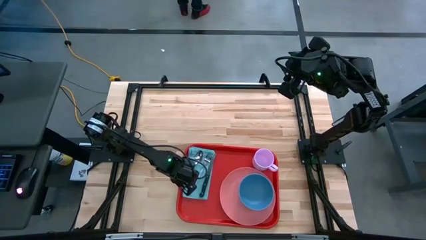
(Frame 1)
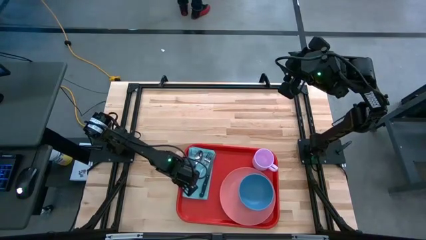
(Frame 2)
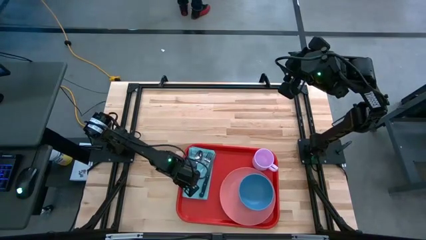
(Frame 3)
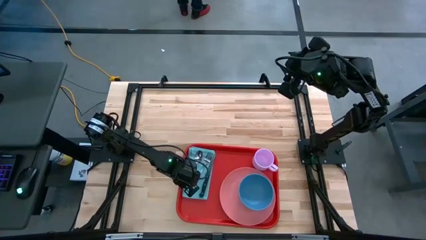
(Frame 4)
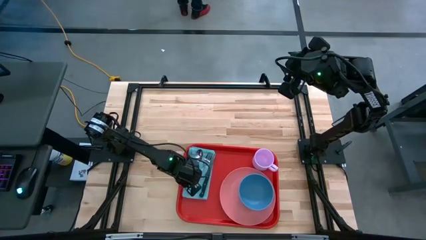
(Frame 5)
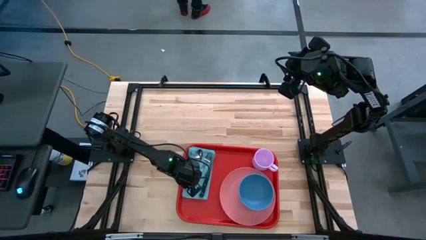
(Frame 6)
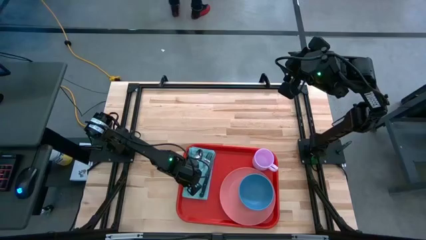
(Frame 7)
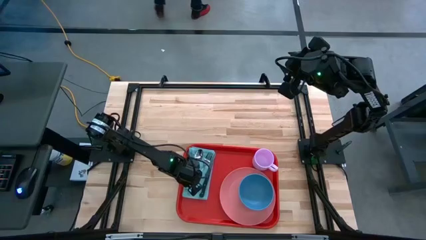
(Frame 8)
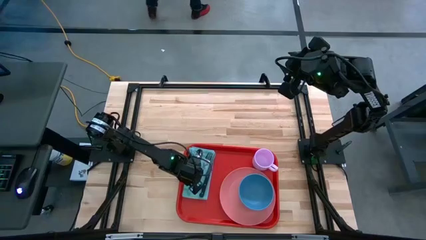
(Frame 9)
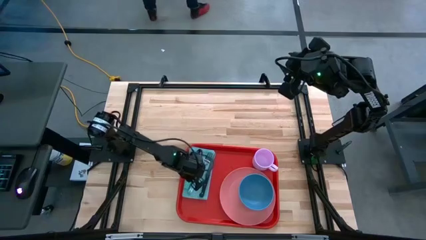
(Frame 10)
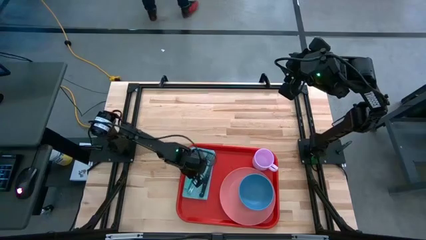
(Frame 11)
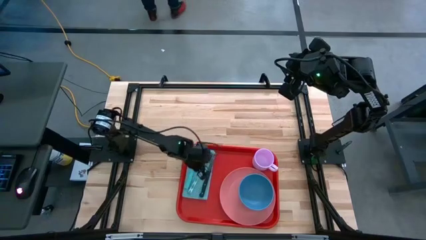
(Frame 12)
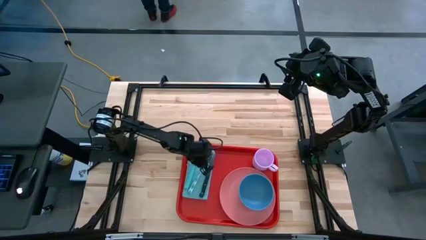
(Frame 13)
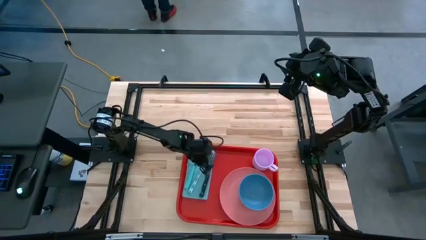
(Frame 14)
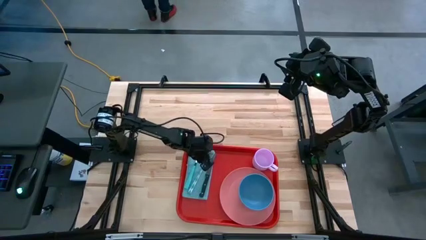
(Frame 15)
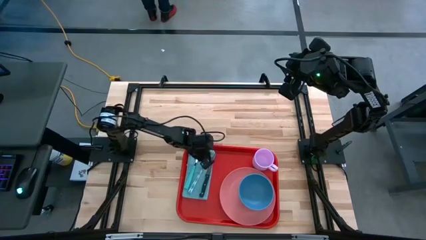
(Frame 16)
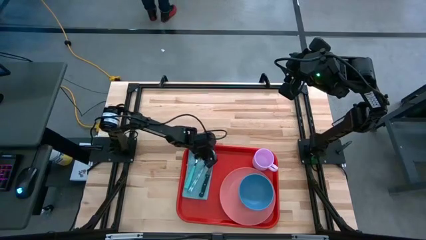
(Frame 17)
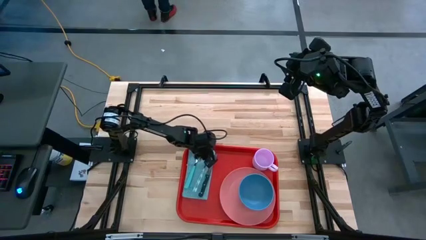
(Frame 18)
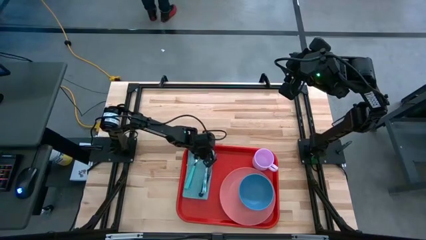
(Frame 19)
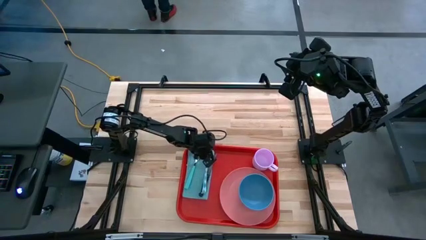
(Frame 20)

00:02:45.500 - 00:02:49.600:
Task: Set up tray
Adjust the silverwares

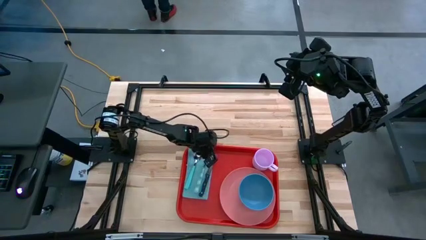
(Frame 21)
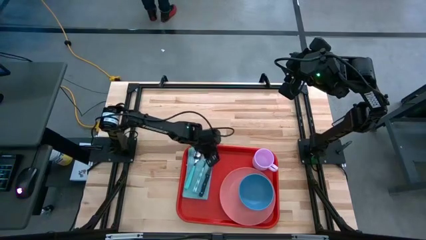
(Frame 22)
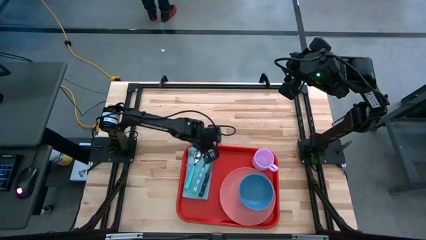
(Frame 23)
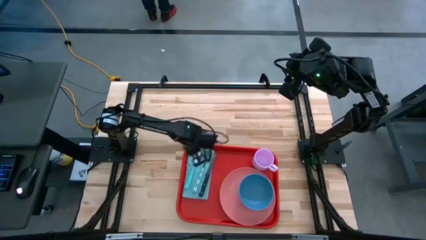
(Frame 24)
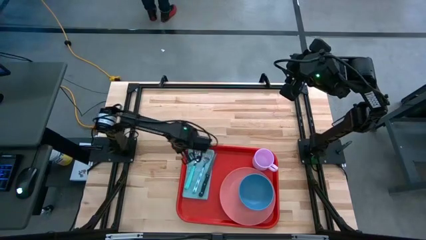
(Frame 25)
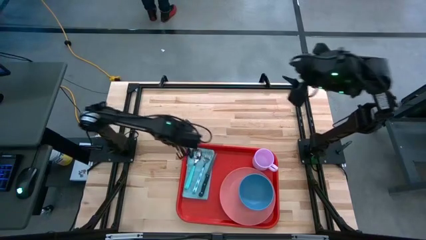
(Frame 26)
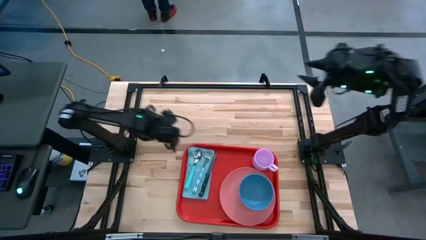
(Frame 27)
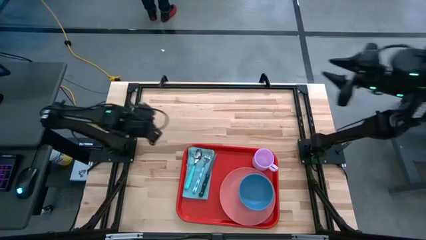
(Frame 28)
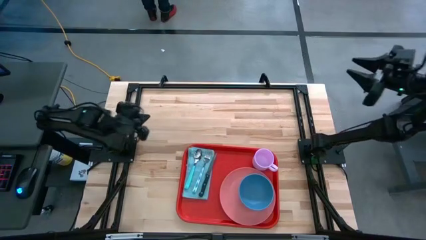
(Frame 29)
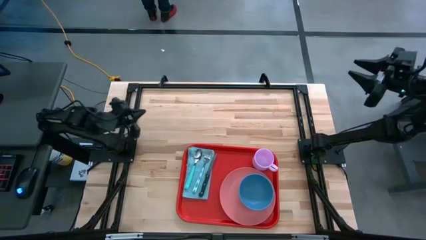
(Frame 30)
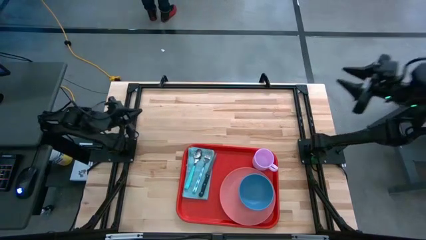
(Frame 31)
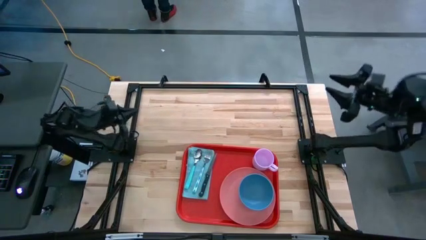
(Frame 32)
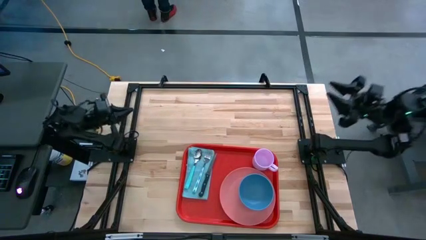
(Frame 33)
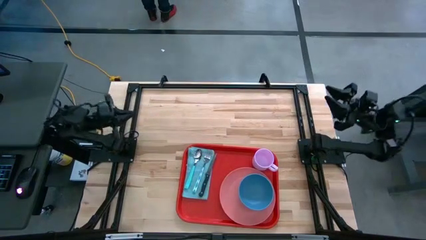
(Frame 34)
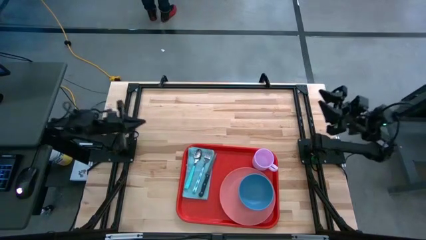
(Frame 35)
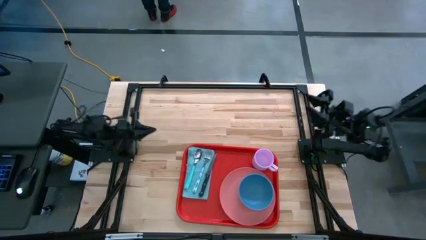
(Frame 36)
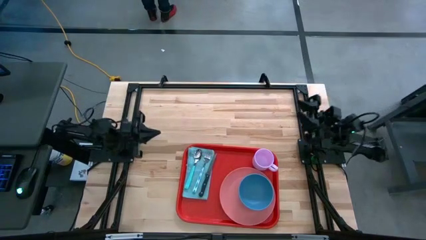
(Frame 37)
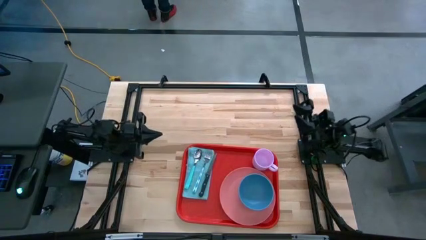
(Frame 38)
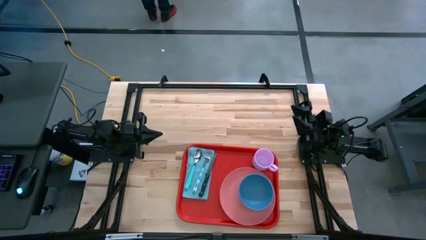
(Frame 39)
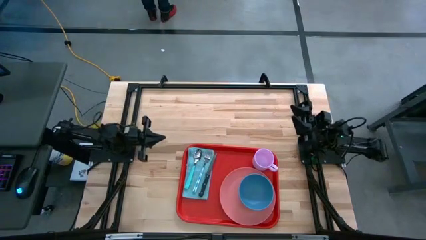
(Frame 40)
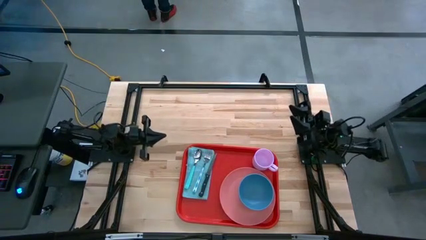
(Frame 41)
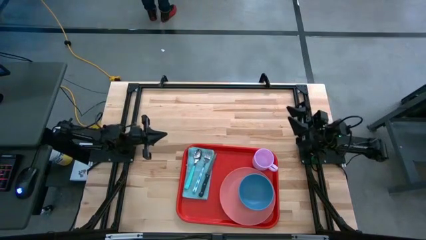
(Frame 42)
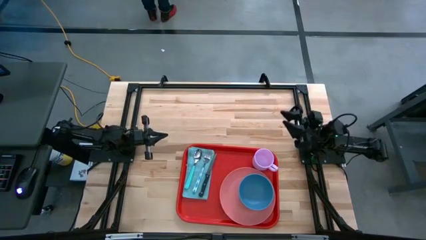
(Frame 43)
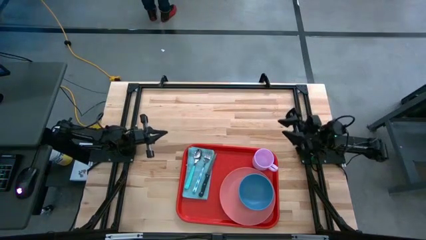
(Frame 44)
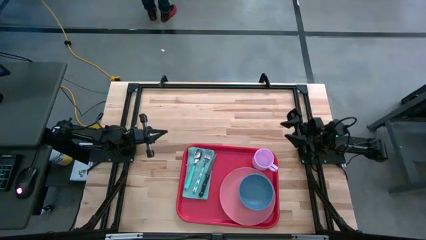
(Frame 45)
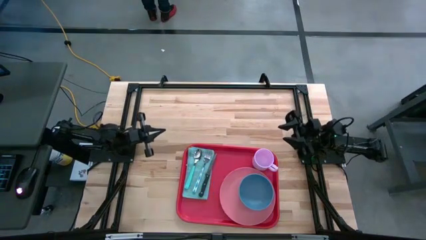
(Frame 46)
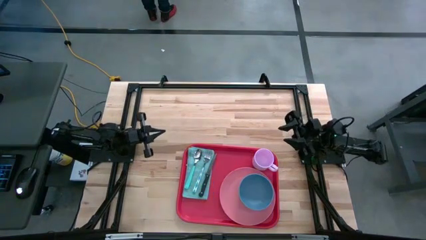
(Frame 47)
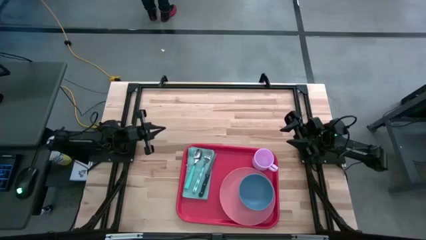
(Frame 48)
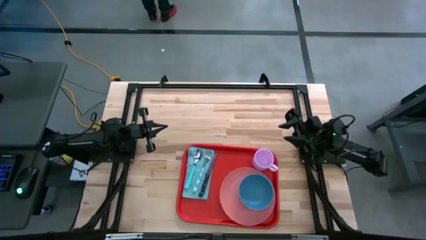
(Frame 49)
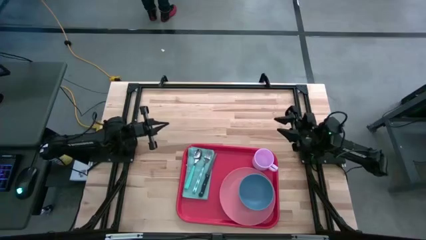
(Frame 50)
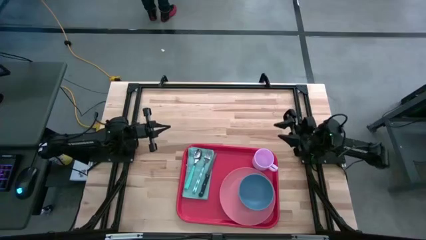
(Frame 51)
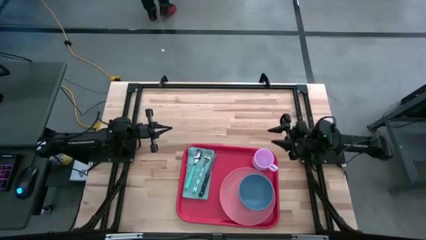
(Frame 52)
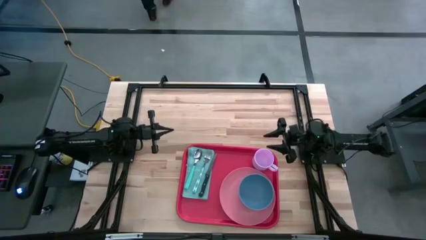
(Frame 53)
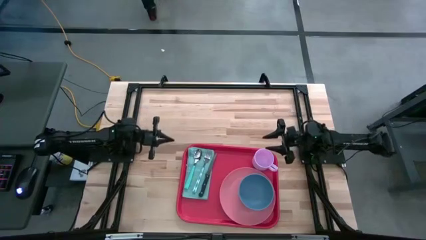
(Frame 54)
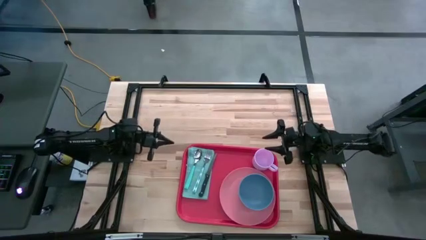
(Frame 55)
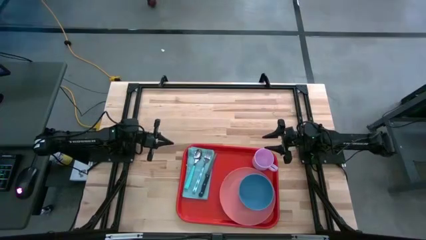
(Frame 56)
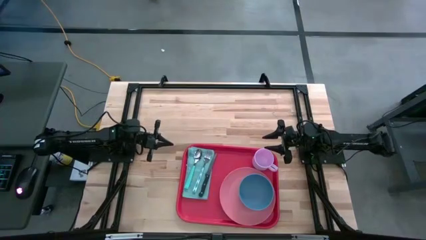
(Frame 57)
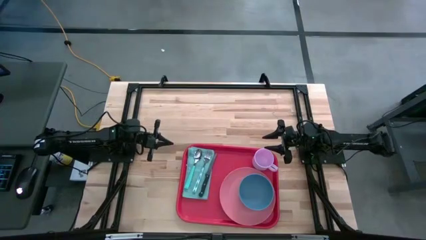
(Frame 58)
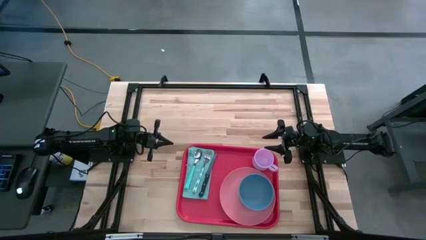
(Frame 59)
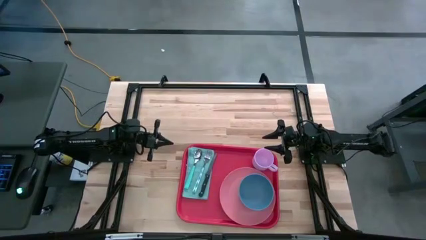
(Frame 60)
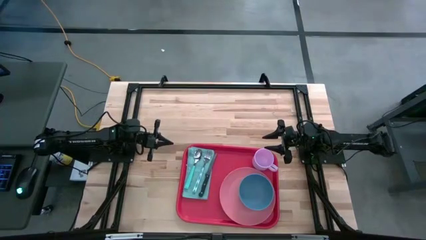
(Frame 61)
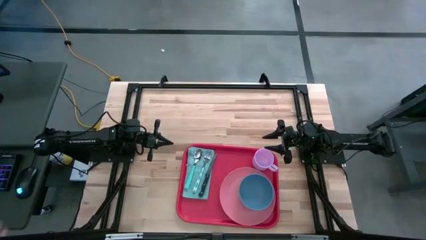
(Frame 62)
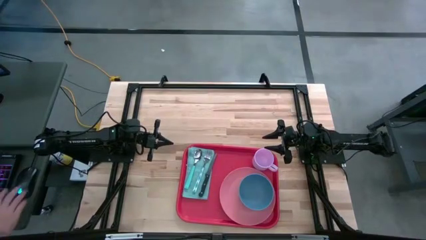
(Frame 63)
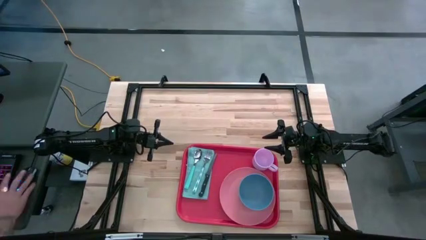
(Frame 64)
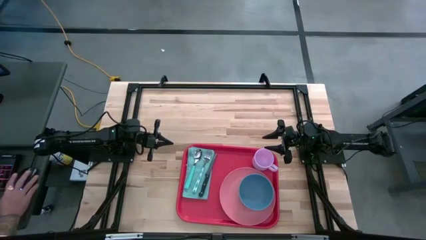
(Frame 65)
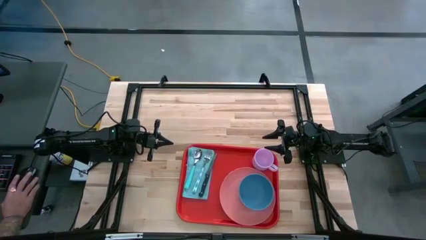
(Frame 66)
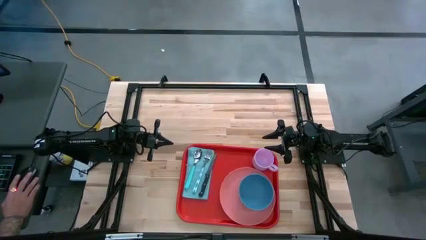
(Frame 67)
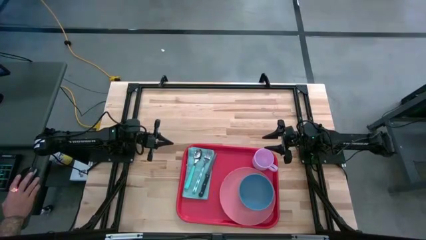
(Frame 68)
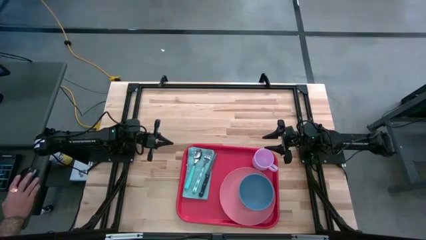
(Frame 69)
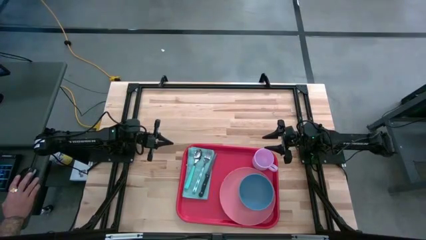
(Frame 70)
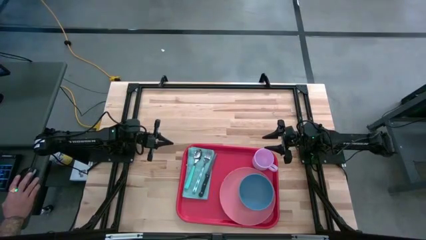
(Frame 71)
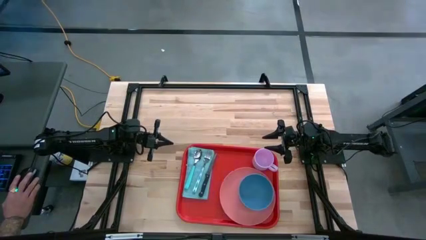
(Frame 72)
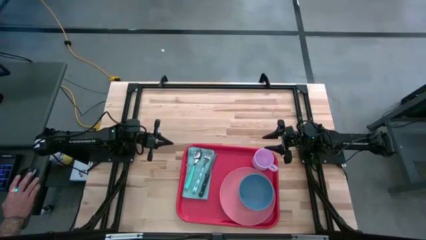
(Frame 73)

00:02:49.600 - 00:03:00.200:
Return to Home Position

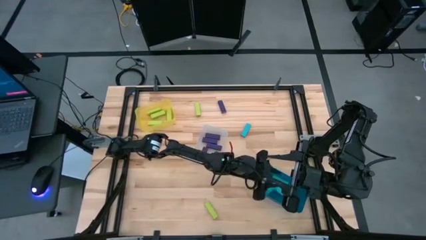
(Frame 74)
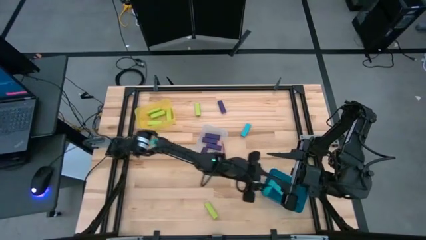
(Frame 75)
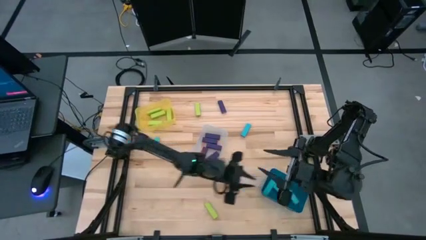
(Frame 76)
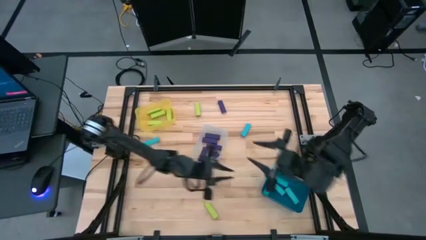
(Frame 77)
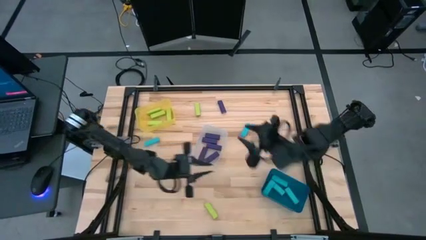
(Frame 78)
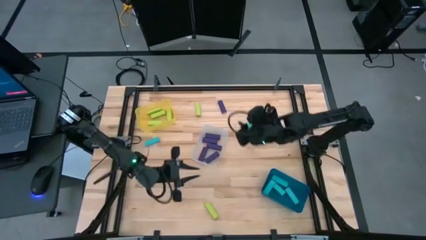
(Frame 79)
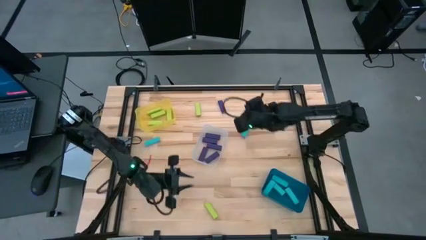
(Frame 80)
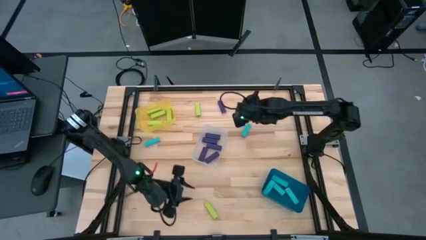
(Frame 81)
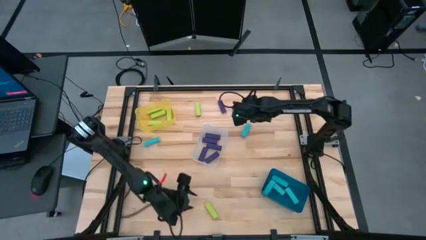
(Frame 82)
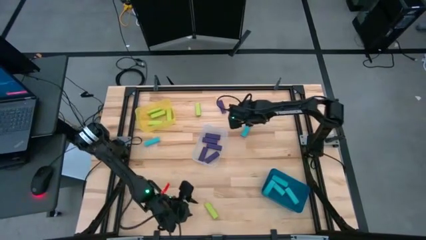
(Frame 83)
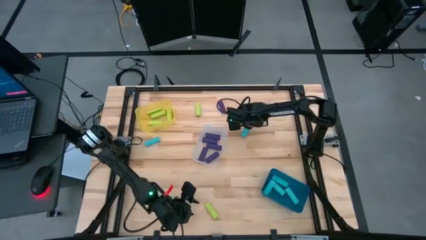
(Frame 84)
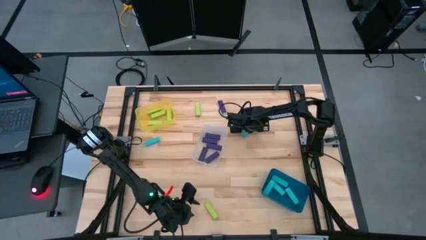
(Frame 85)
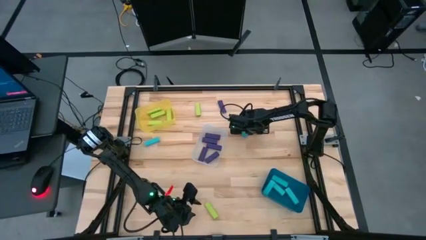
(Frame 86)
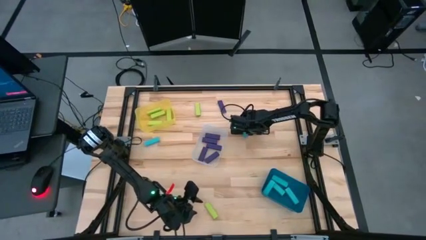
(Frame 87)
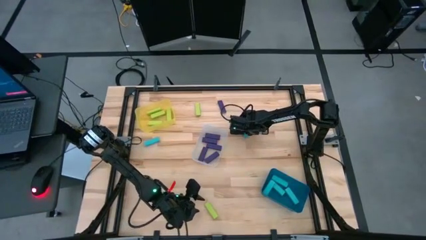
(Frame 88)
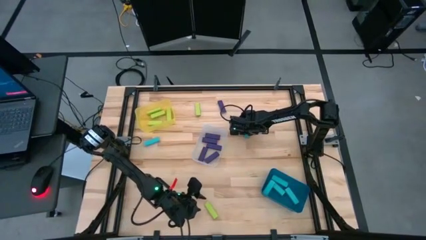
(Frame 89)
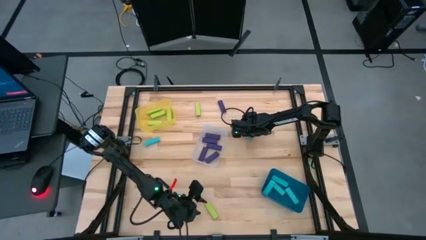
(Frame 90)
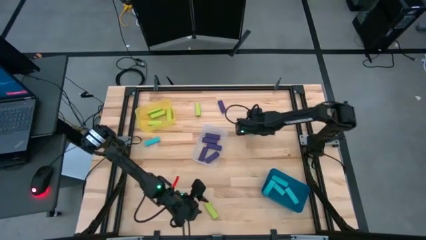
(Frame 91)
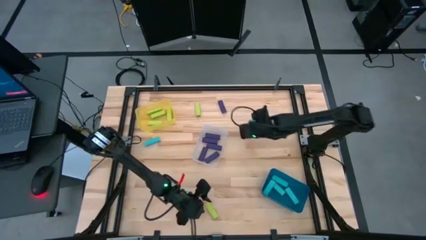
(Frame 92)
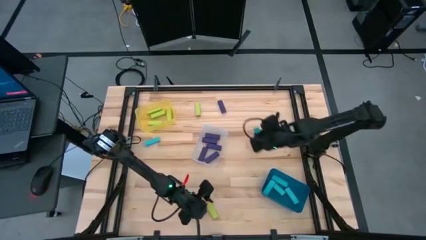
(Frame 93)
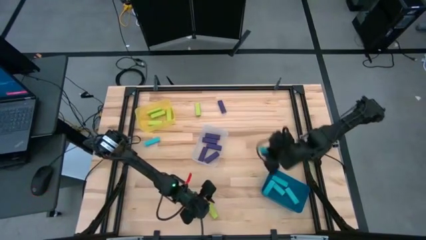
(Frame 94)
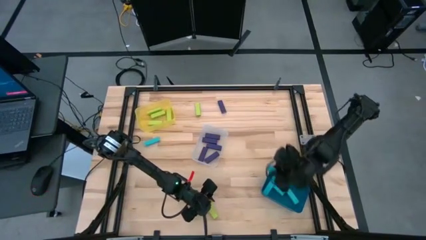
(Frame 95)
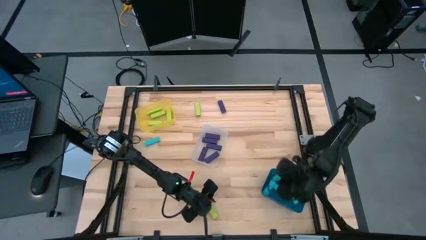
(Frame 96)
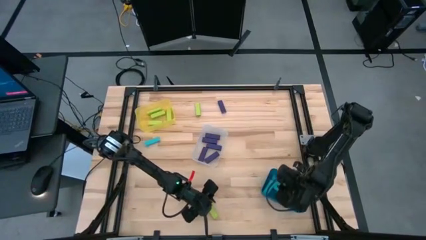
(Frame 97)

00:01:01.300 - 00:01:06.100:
Task: Sort blocks
Put the right blue block into the blue bin
